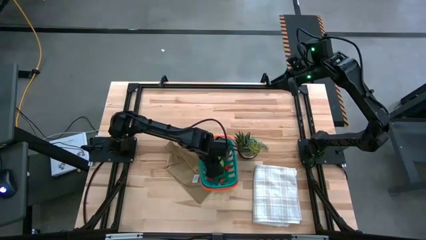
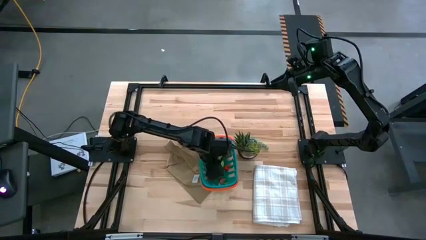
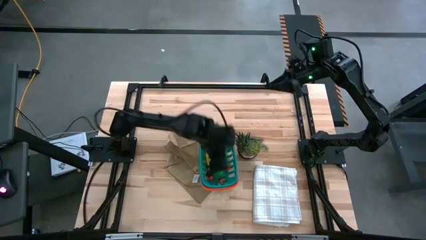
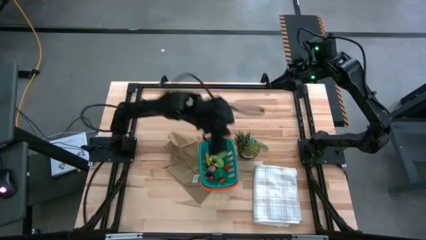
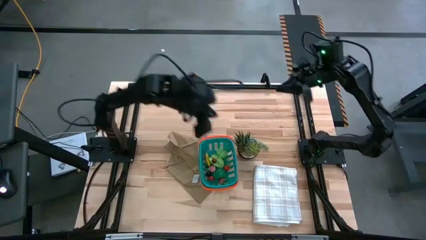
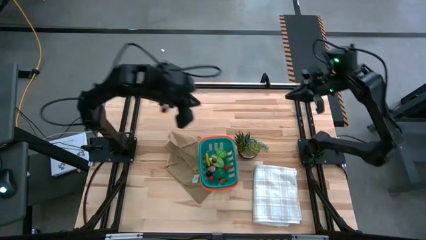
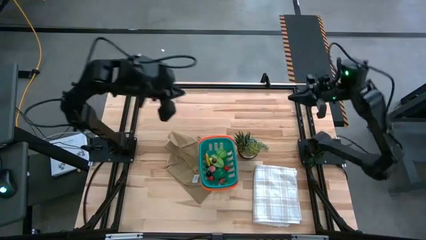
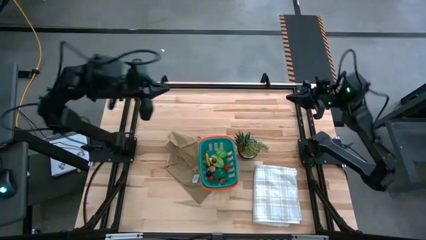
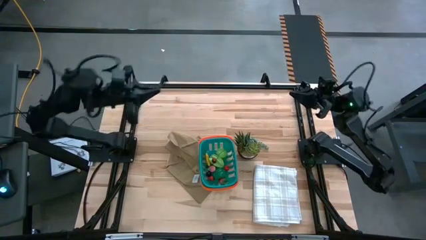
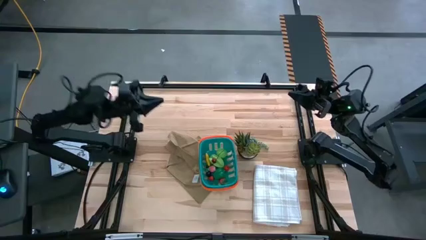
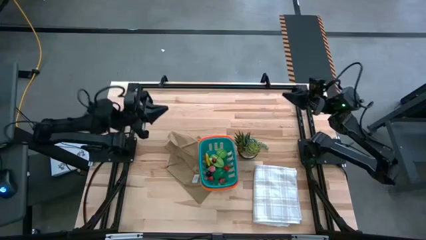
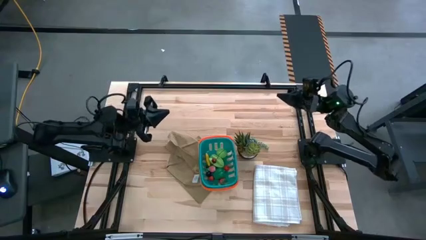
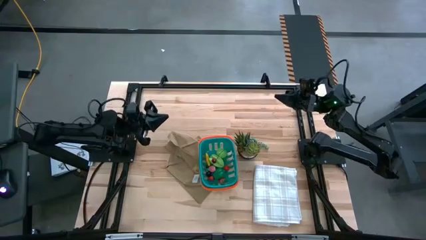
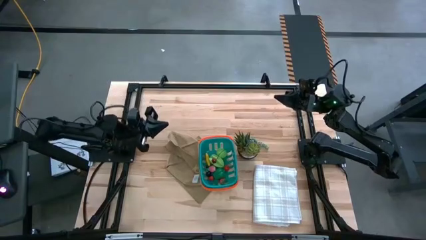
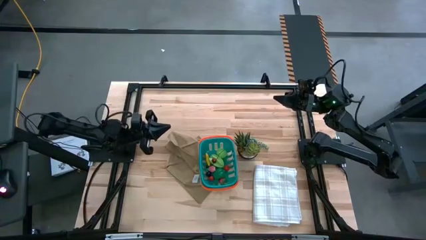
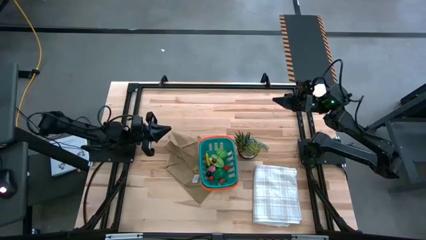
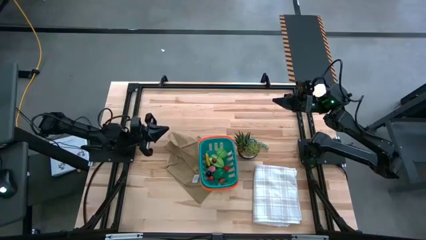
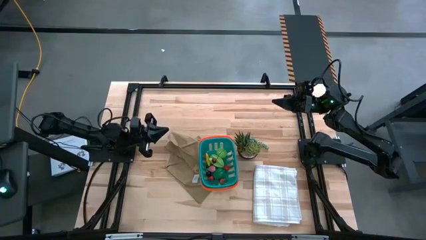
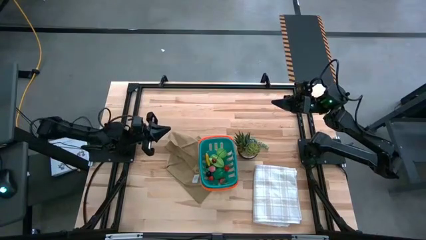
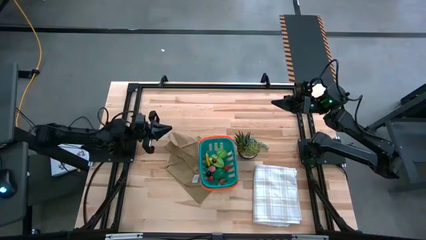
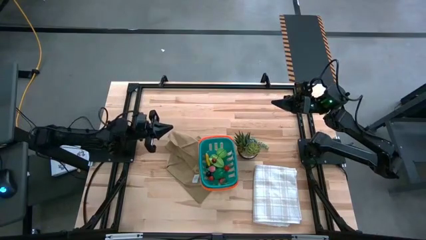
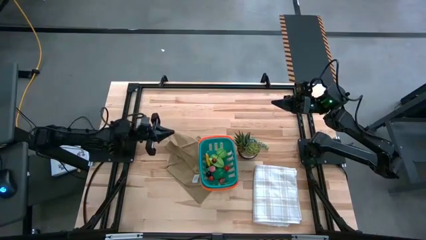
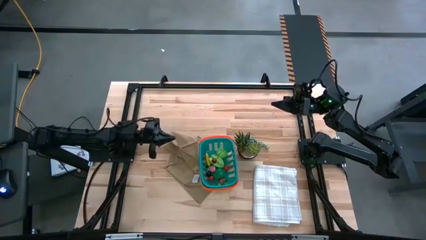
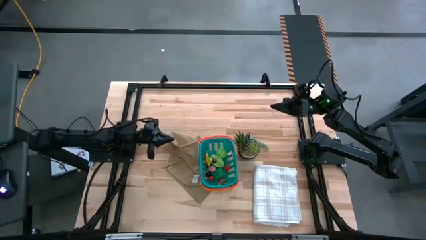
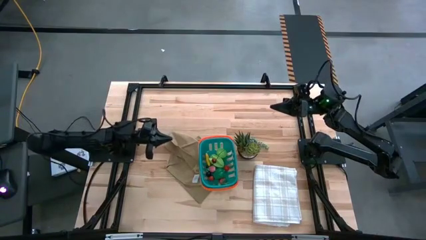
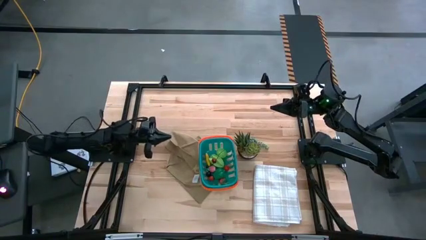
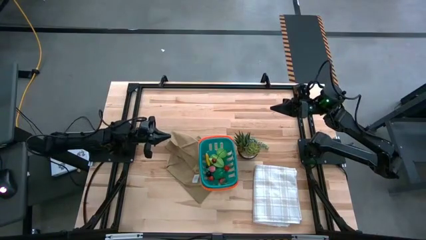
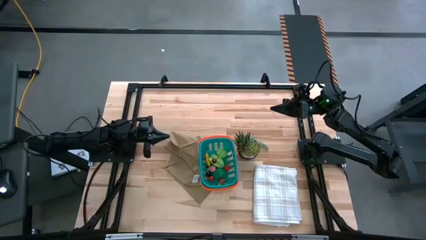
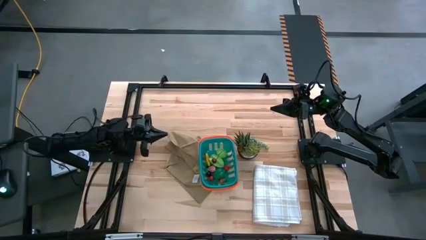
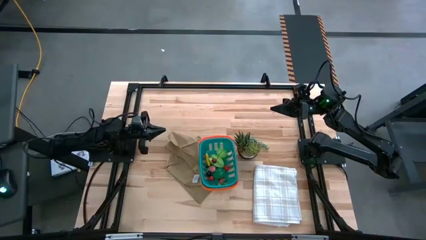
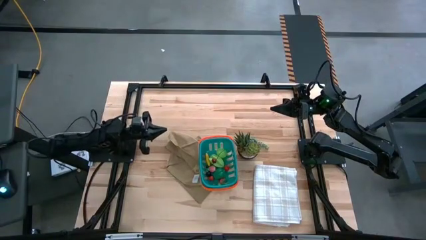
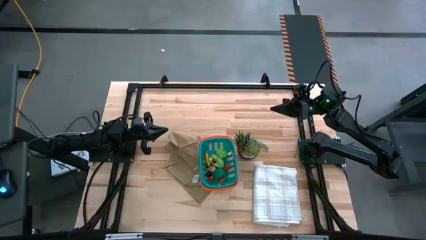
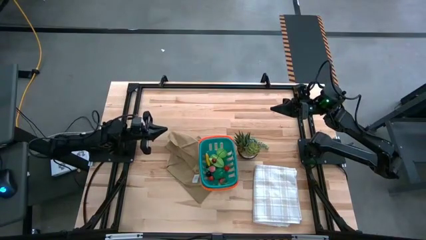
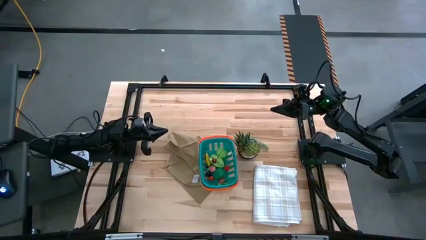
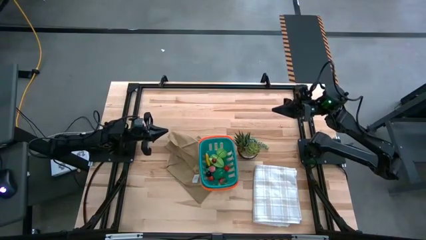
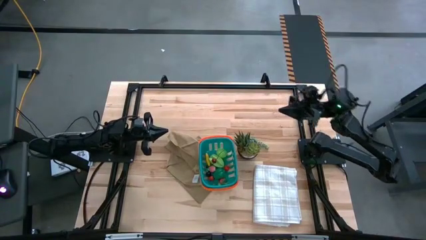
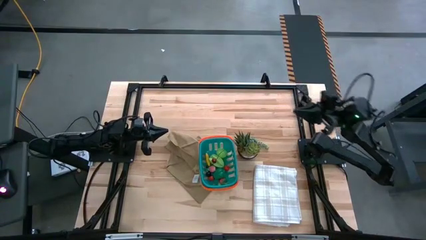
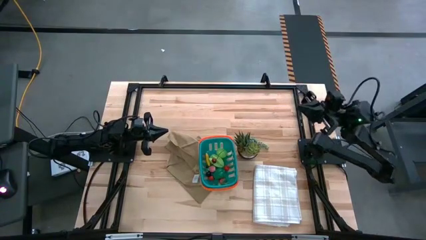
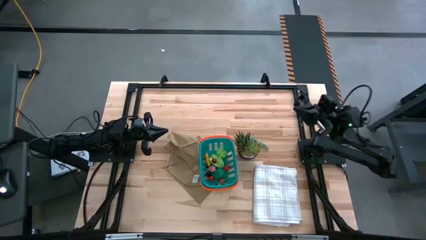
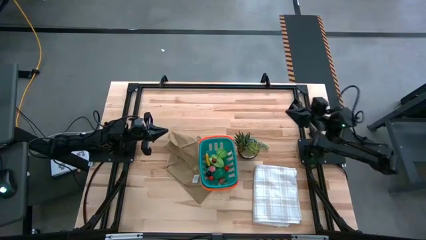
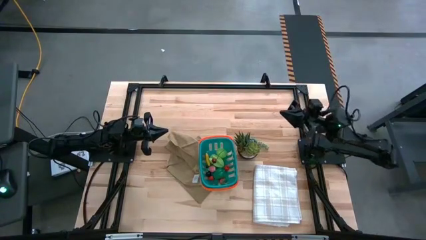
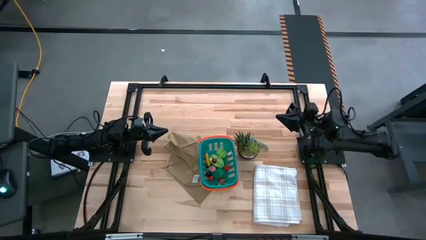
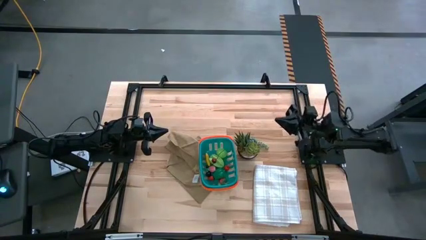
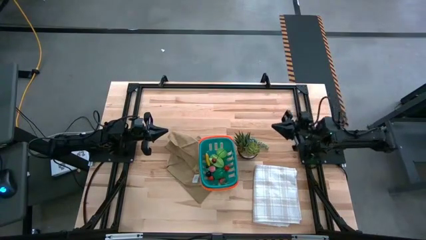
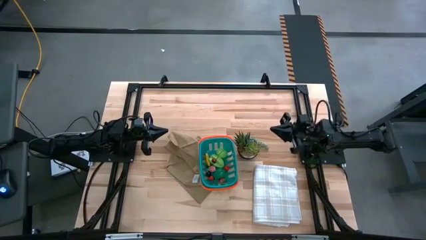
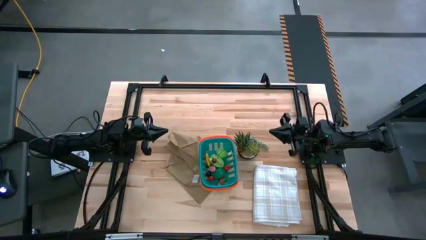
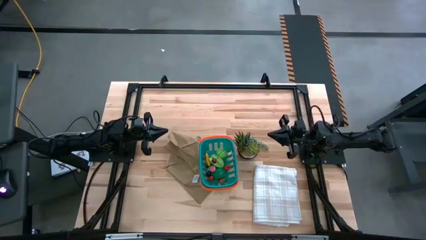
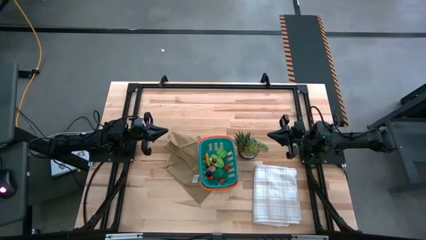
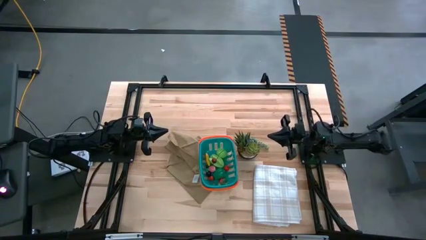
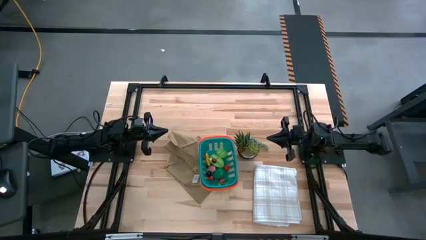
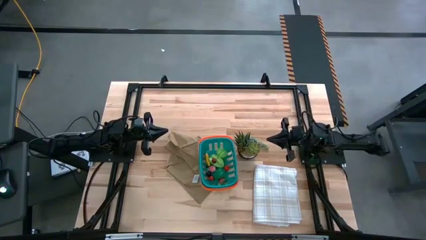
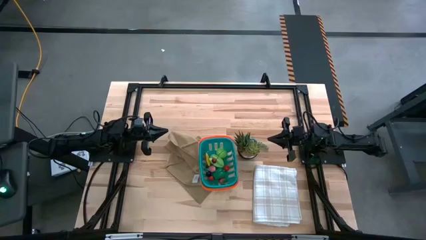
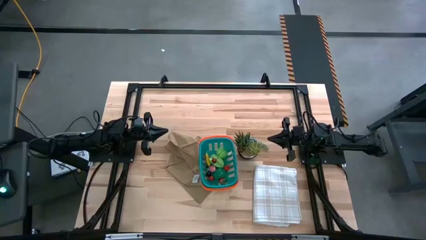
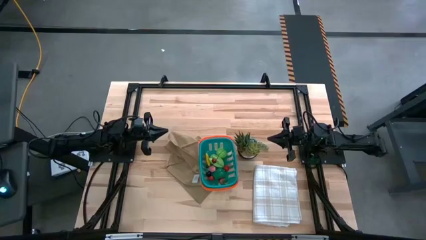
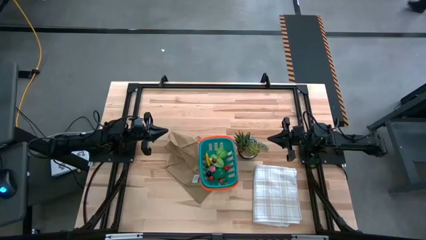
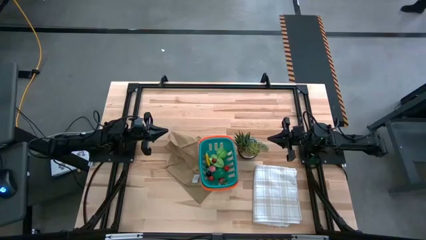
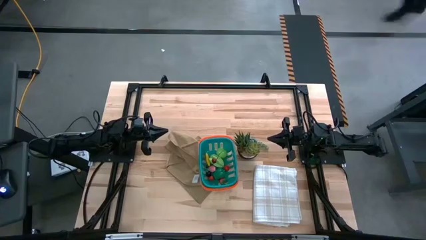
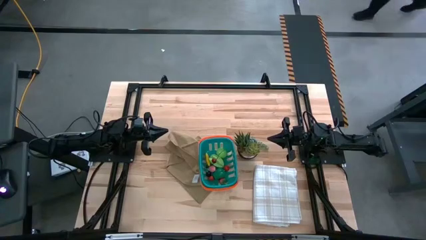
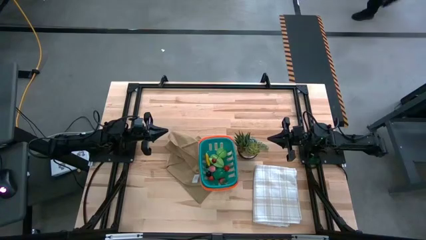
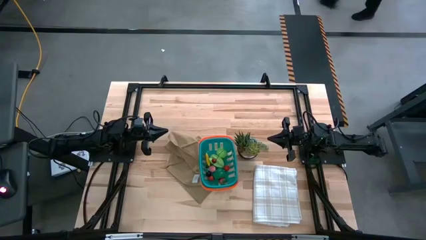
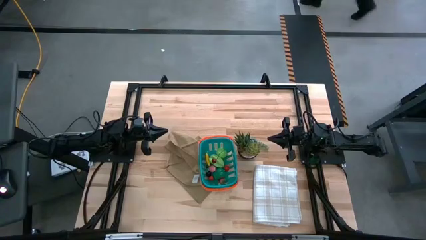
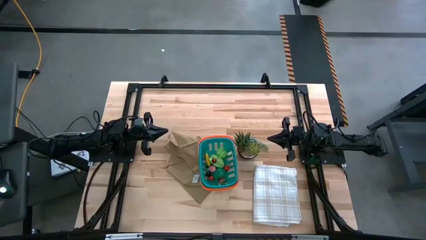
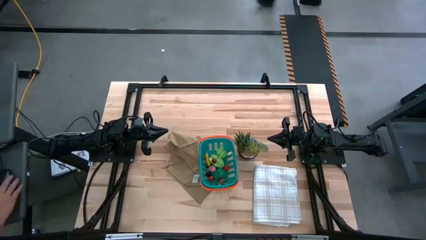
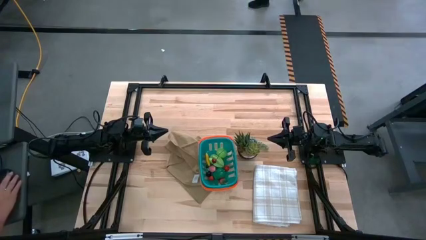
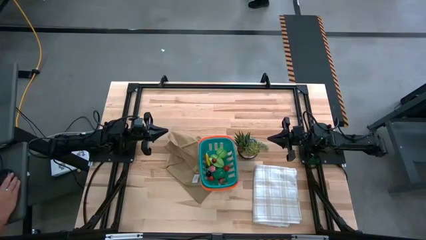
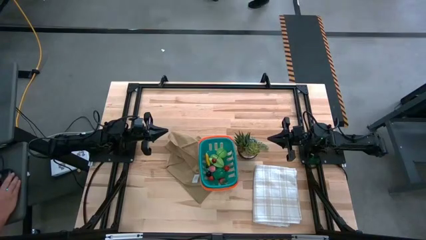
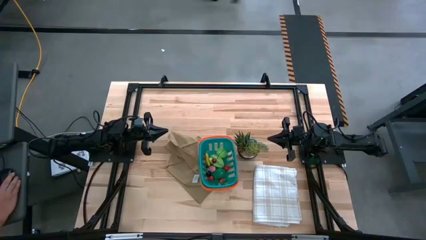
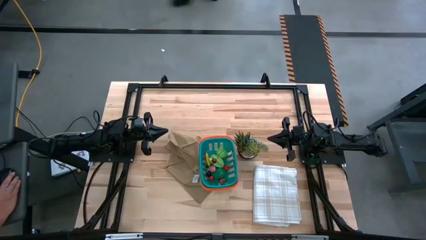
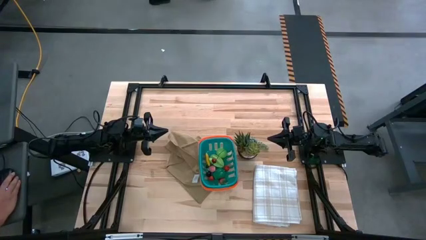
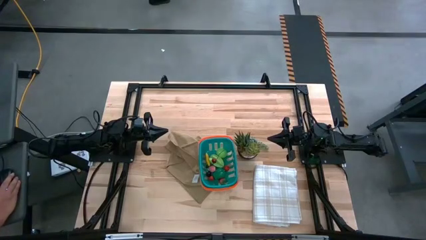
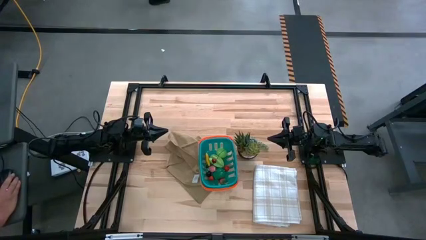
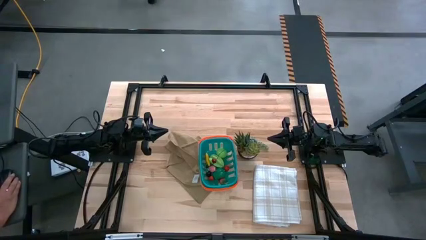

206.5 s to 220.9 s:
Task: Pick and placing Produce into tupperware
Return to Home Position
